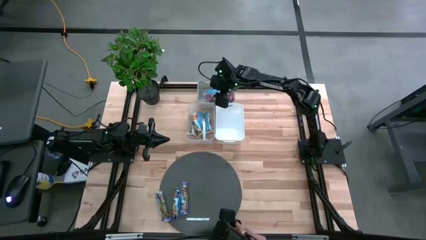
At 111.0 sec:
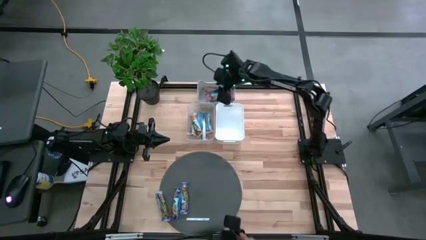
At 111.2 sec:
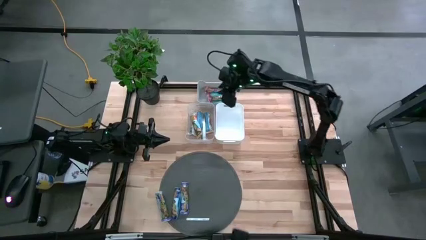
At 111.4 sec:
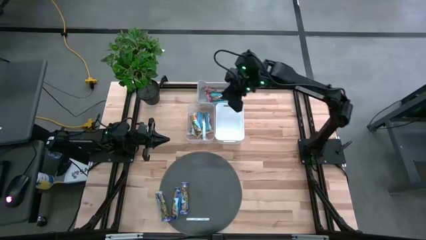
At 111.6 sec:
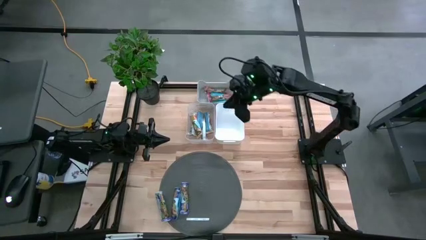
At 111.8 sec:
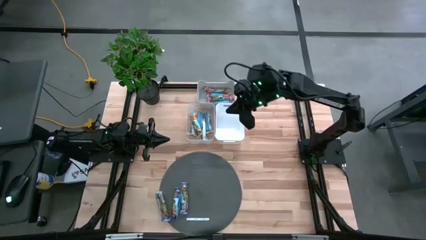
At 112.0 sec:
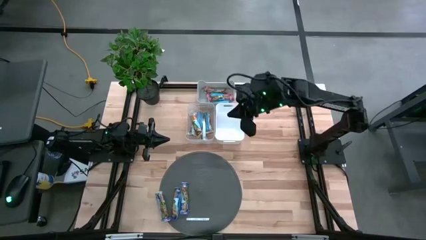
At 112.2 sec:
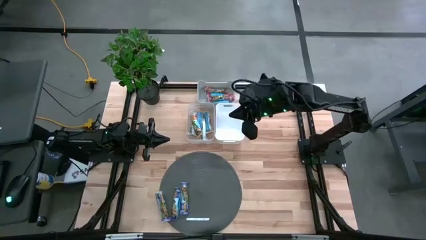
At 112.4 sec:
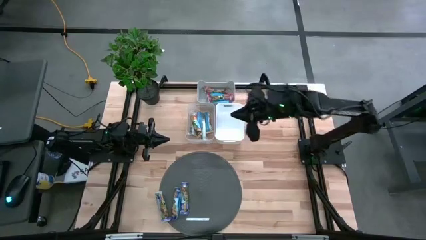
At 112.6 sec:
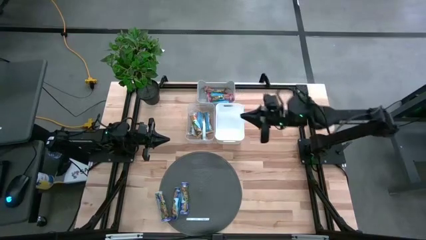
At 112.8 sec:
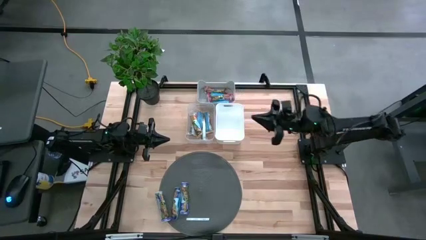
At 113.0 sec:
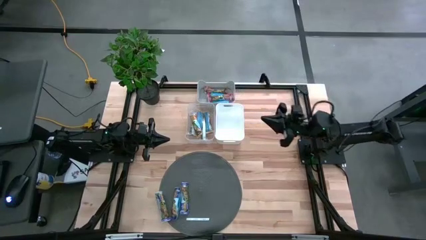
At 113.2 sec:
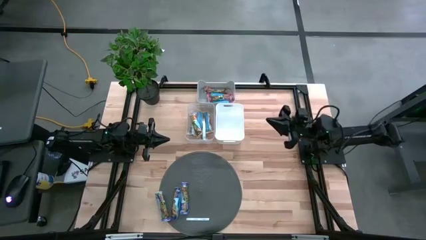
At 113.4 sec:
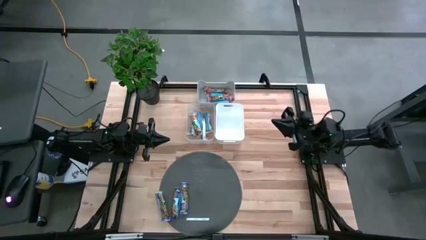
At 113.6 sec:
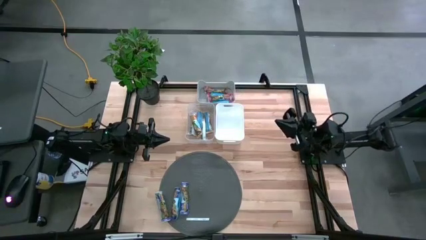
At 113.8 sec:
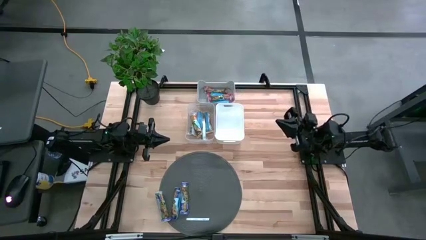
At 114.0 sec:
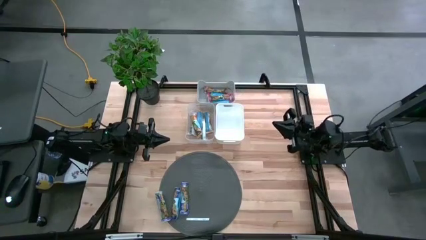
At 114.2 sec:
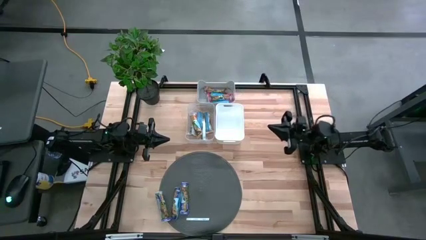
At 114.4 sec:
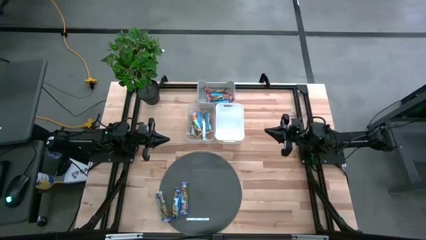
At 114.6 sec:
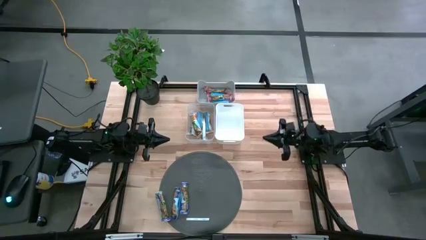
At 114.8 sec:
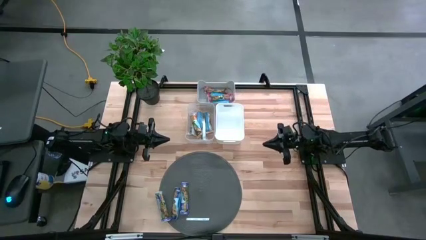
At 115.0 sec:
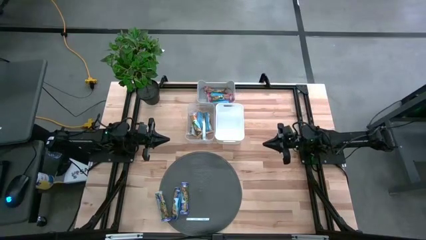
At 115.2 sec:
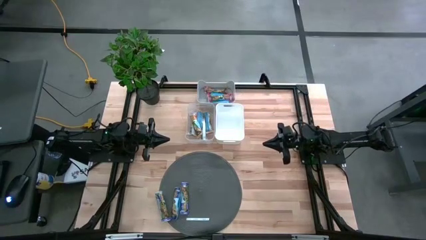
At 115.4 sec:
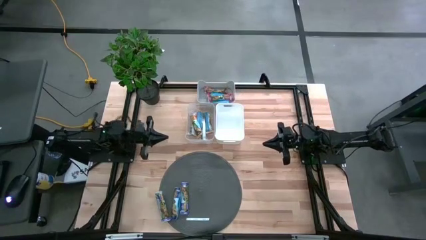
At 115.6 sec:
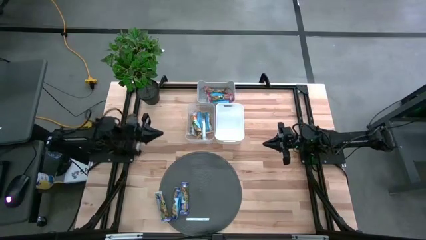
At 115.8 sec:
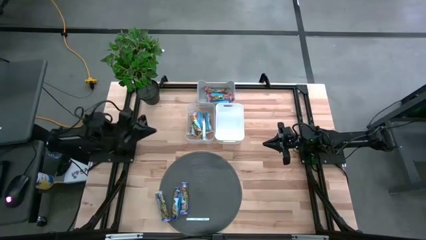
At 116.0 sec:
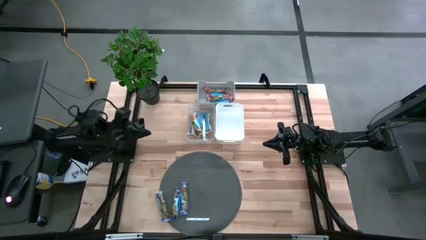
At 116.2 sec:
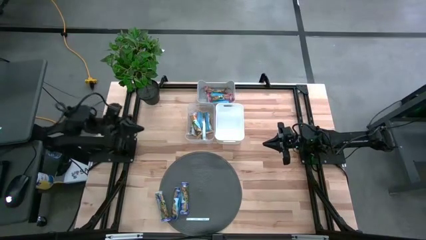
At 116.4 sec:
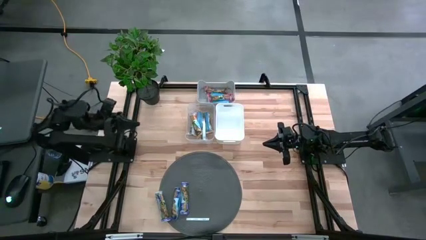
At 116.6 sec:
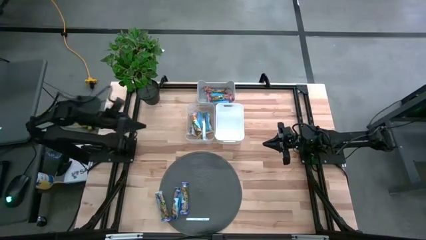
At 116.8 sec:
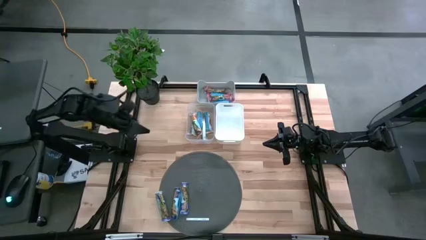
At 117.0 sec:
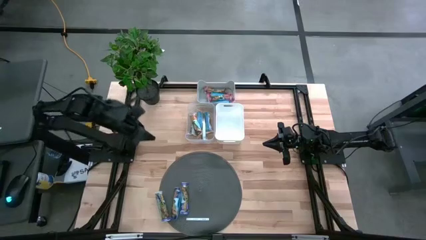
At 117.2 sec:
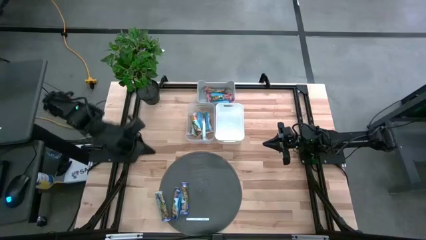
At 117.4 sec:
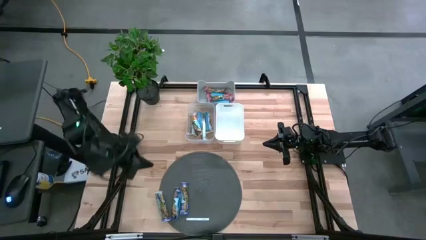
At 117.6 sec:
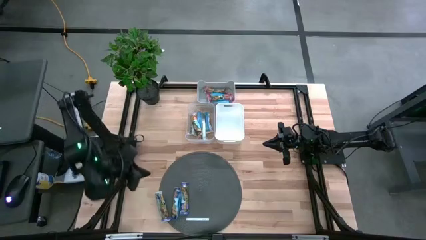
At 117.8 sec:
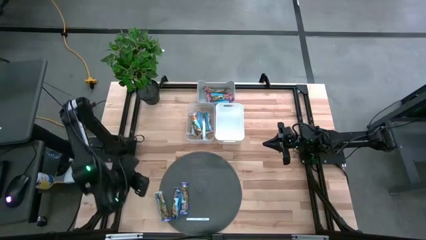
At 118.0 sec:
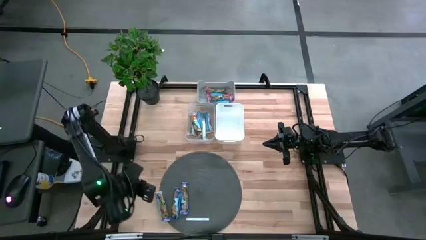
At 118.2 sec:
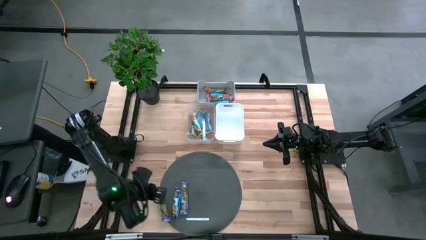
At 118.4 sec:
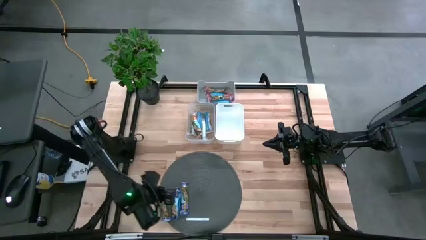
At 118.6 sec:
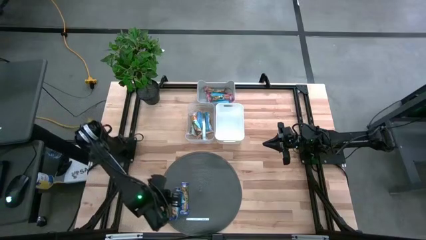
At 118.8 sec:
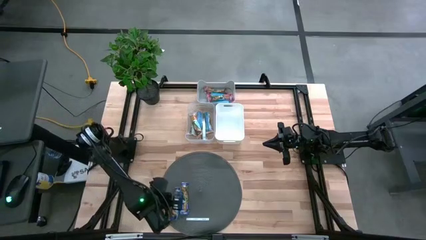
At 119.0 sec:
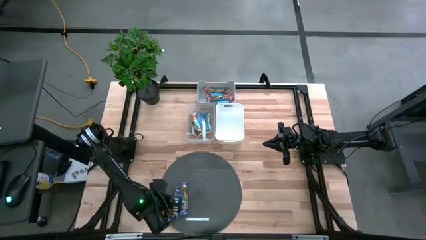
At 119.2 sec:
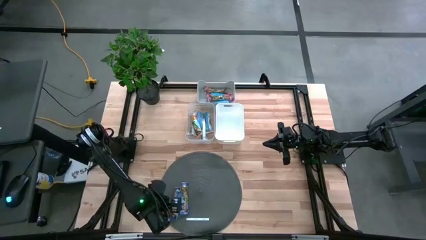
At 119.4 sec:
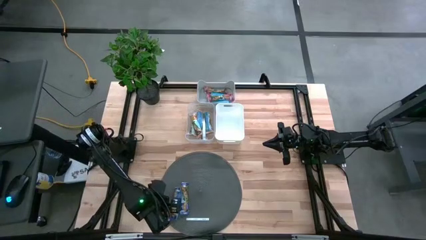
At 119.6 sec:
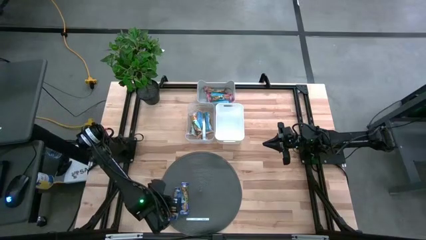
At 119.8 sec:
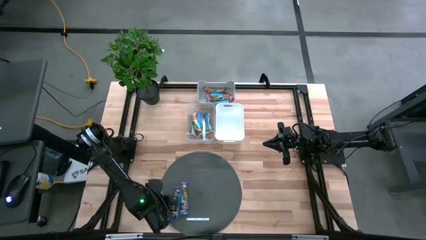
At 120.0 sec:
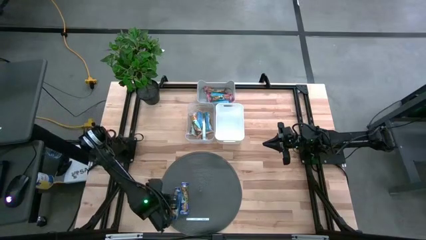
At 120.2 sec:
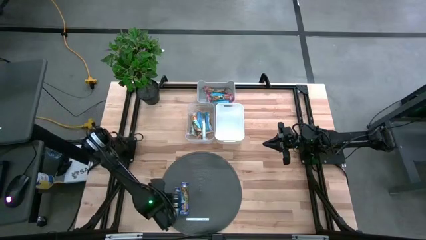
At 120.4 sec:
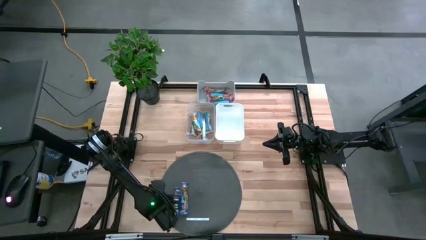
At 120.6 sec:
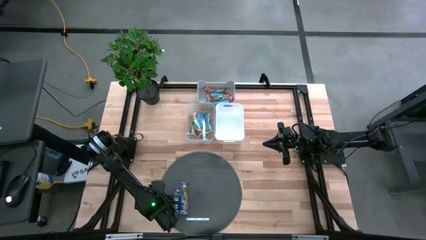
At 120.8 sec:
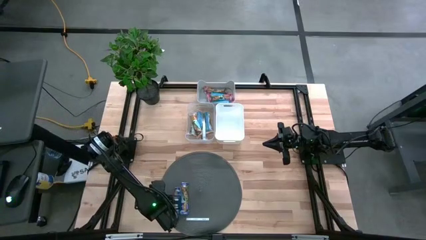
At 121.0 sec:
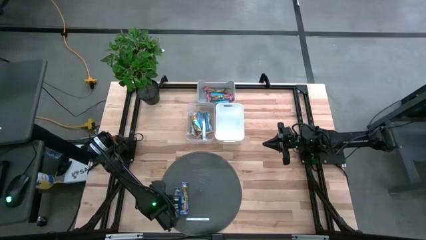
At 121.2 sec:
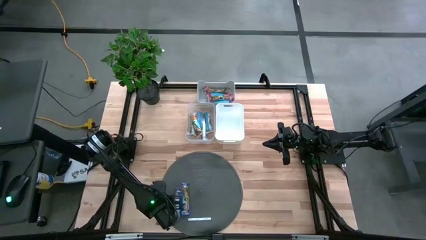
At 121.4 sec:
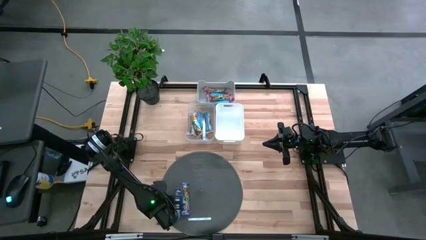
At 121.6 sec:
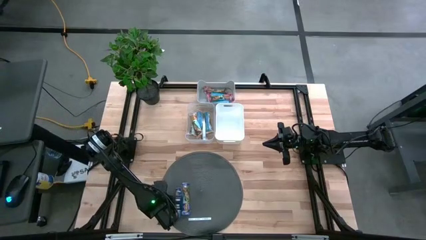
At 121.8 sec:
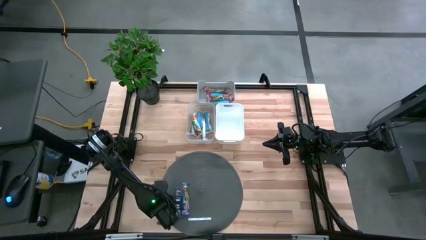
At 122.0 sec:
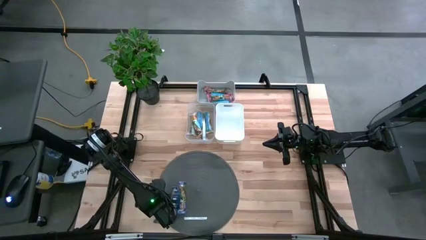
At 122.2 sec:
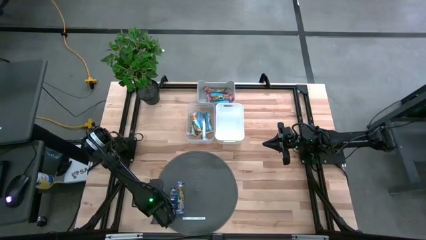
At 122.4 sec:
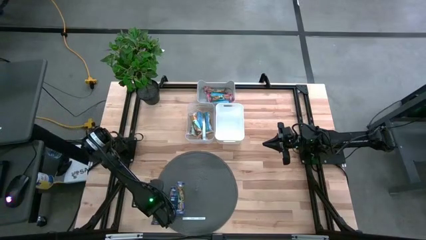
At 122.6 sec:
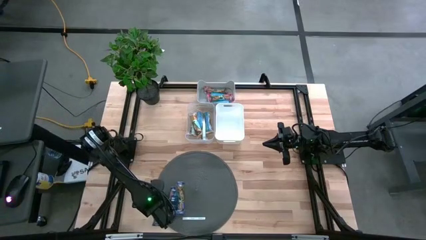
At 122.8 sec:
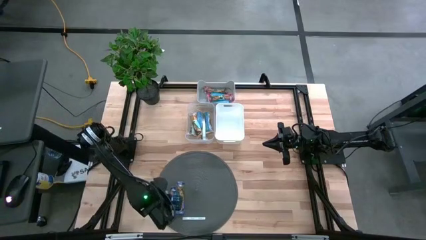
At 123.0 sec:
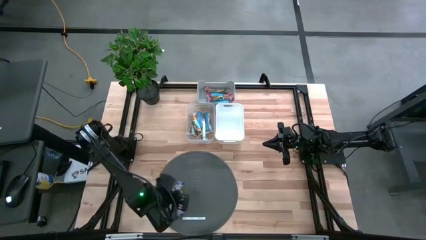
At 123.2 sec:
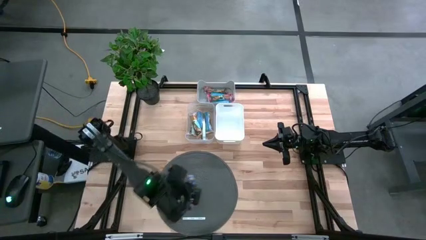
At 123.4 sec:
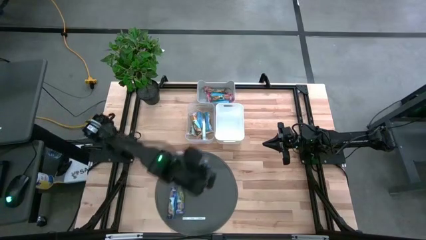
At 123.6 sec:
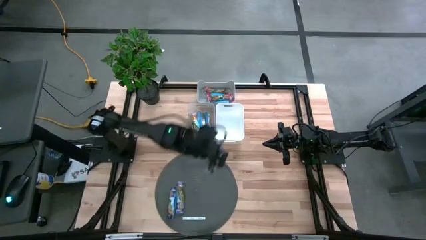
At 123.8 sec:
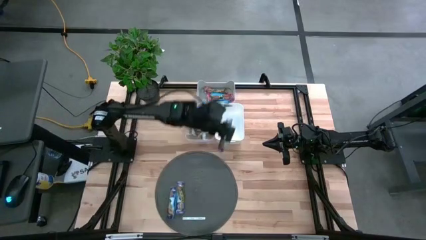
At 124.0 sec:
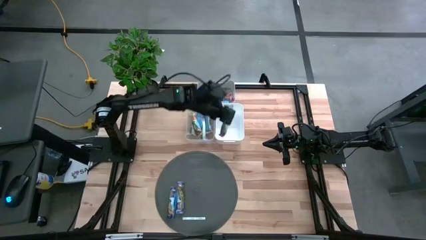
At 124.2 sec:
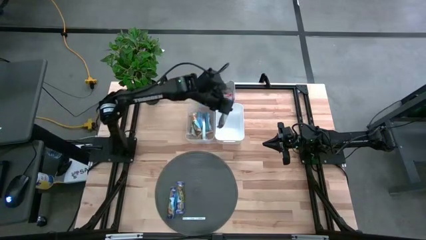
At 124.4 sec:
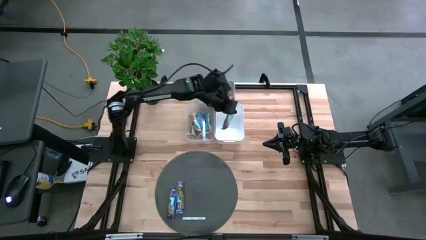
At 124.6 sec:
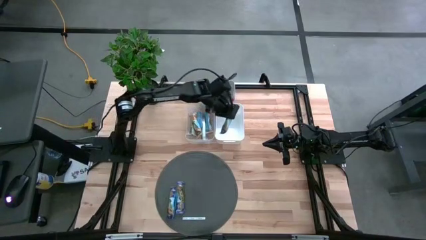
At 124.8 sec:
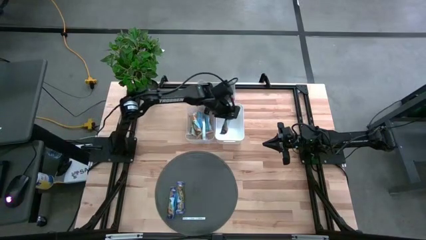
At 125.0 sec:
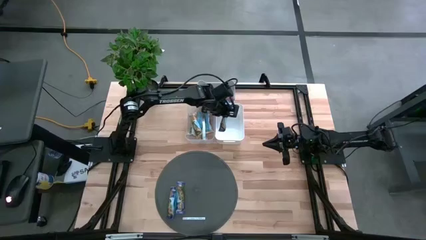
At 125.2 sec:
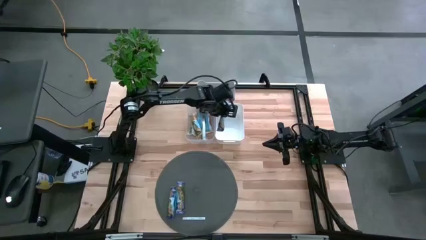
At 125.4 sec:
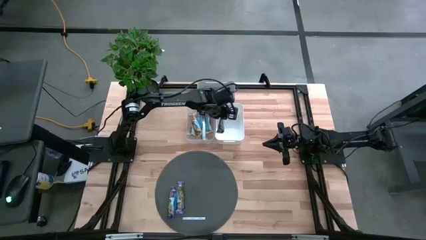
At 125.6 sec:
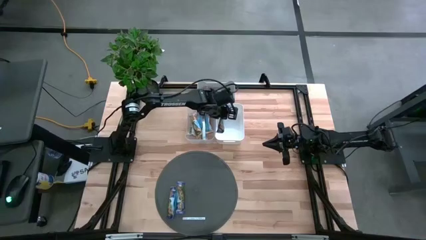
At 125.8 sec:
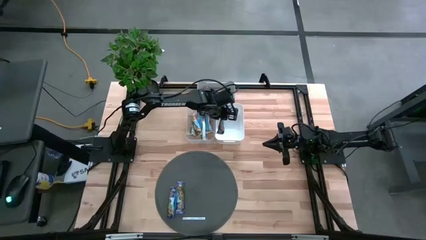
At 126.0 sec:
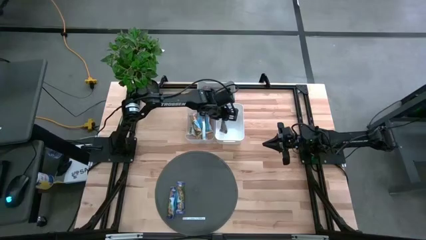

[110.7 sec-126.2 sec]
Task: Pick and place Granola Bars by type
Put the blue granola bar into the white bin
